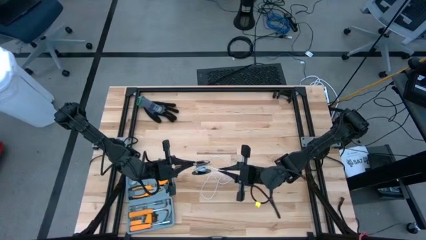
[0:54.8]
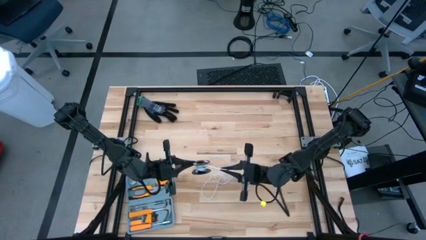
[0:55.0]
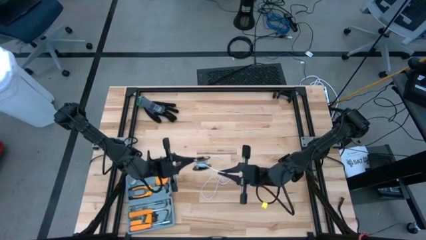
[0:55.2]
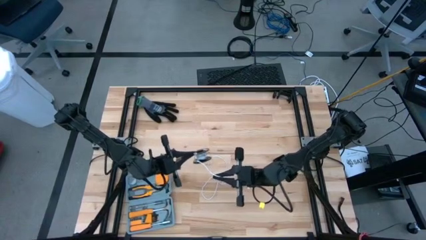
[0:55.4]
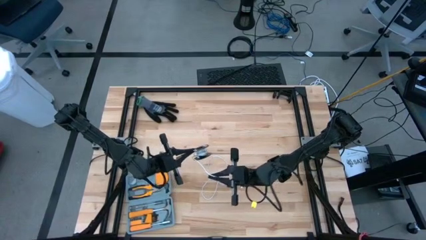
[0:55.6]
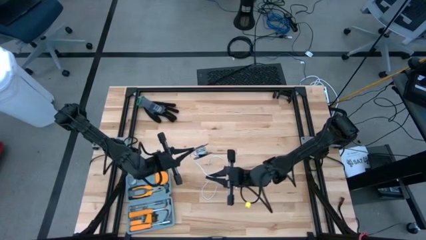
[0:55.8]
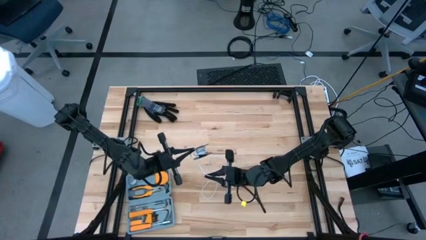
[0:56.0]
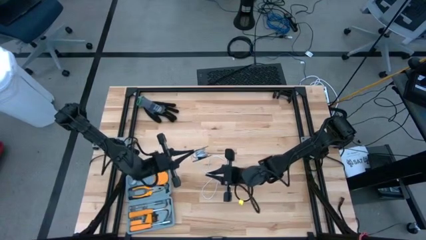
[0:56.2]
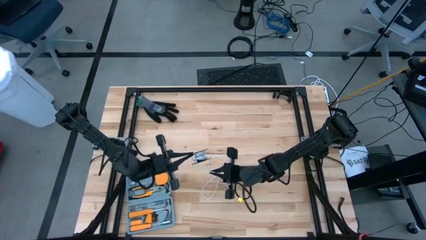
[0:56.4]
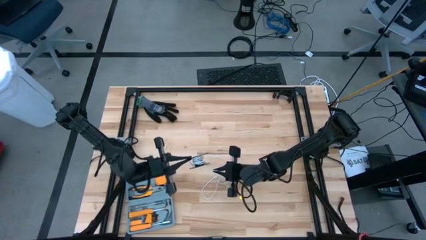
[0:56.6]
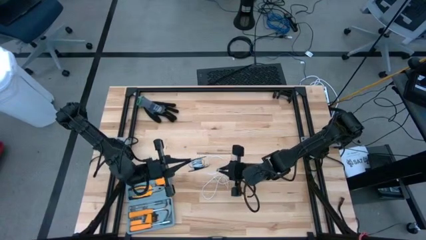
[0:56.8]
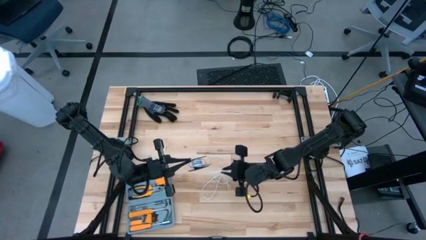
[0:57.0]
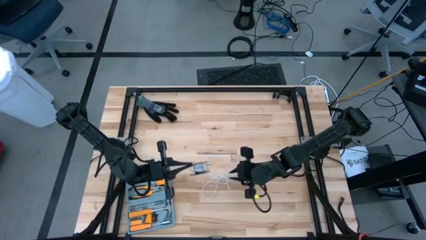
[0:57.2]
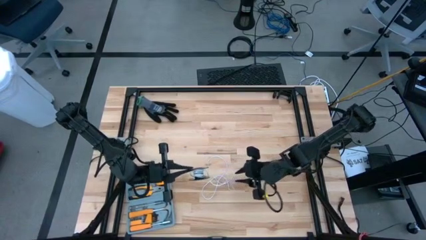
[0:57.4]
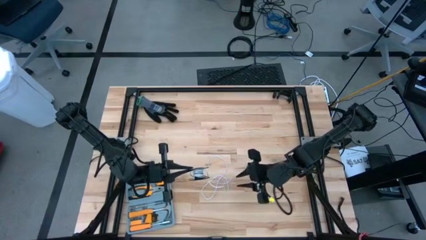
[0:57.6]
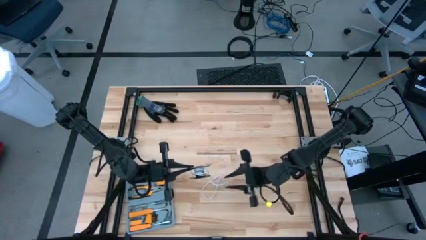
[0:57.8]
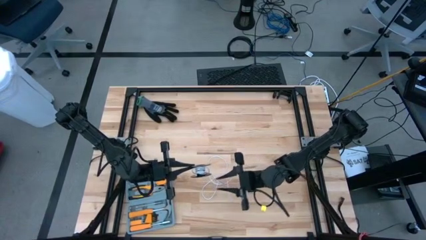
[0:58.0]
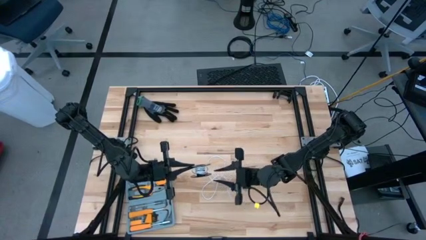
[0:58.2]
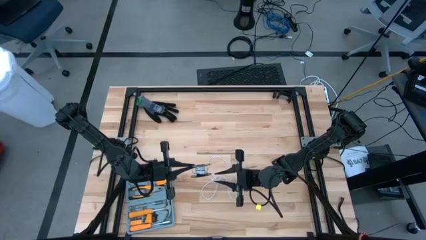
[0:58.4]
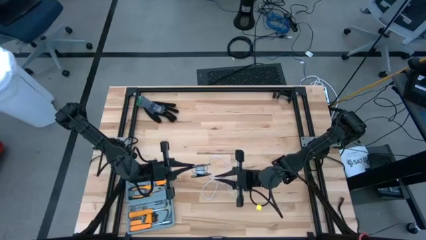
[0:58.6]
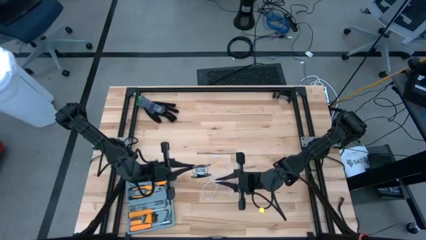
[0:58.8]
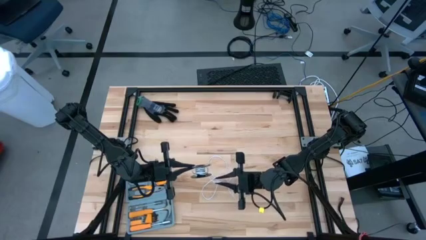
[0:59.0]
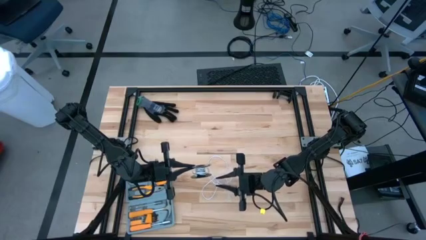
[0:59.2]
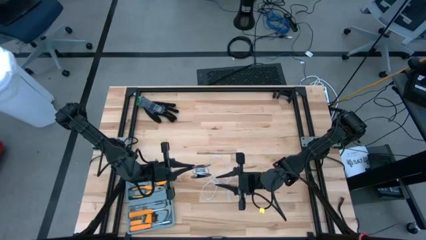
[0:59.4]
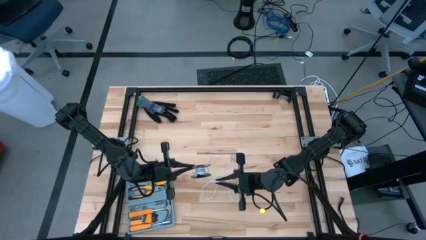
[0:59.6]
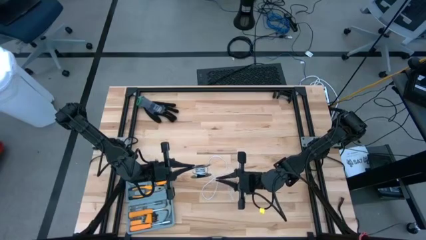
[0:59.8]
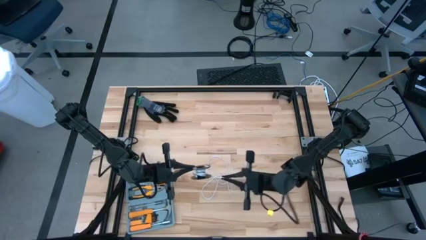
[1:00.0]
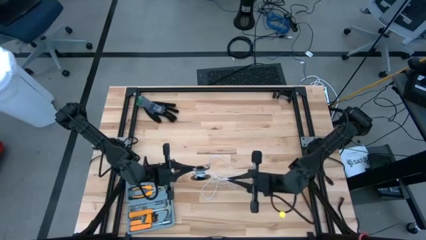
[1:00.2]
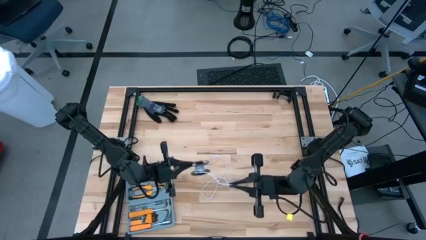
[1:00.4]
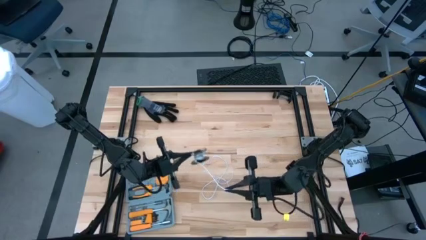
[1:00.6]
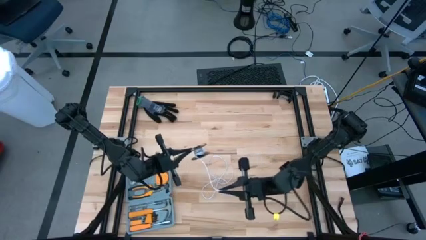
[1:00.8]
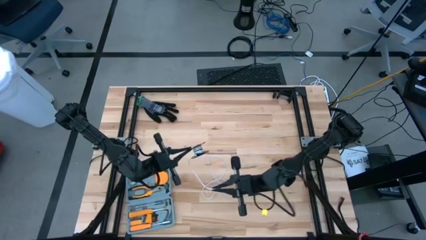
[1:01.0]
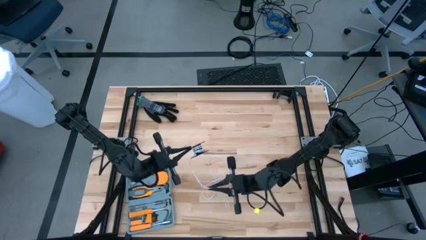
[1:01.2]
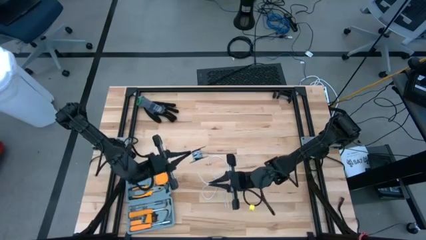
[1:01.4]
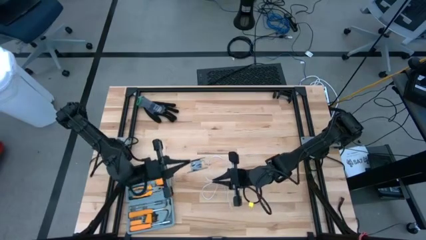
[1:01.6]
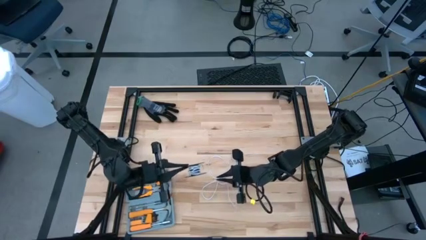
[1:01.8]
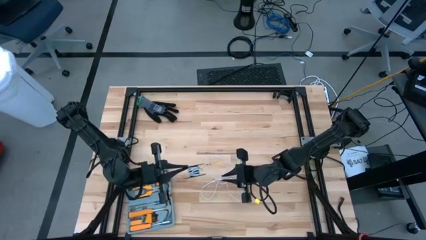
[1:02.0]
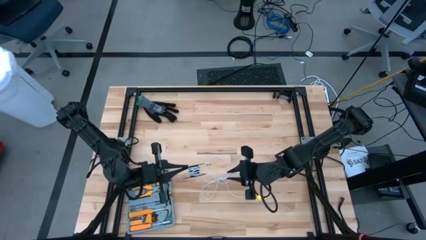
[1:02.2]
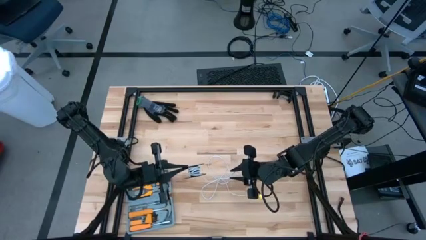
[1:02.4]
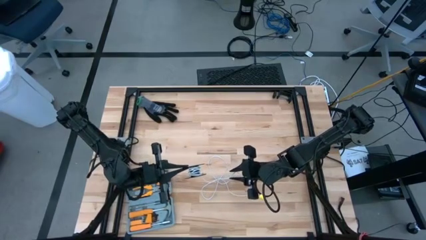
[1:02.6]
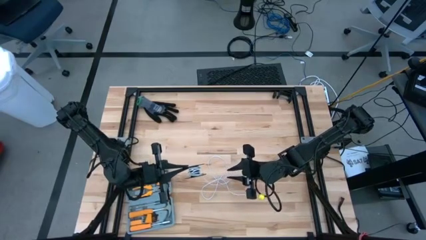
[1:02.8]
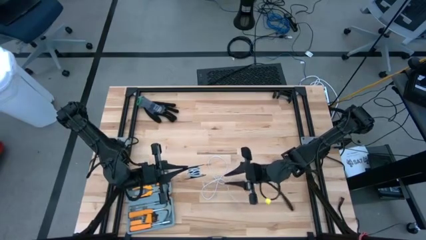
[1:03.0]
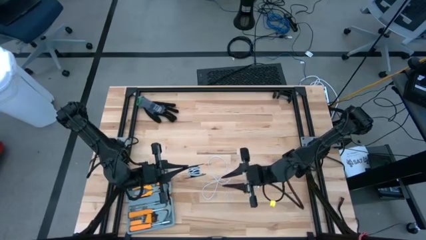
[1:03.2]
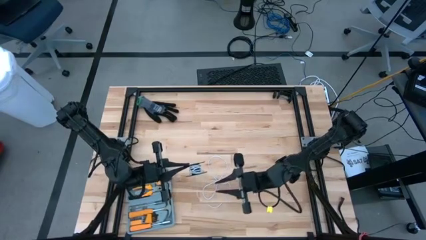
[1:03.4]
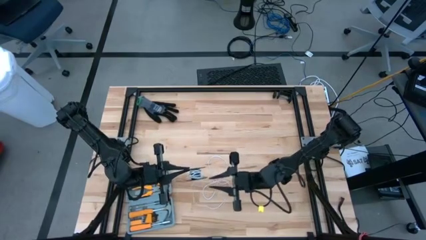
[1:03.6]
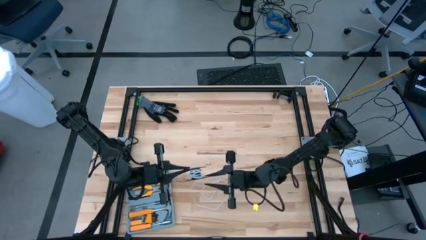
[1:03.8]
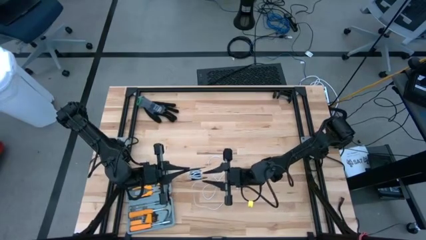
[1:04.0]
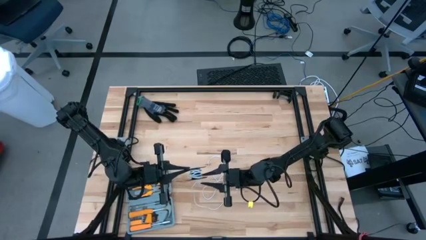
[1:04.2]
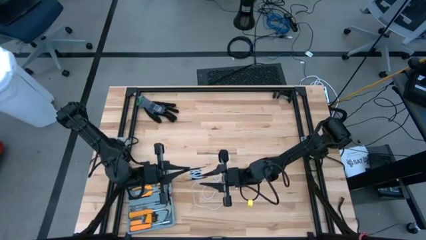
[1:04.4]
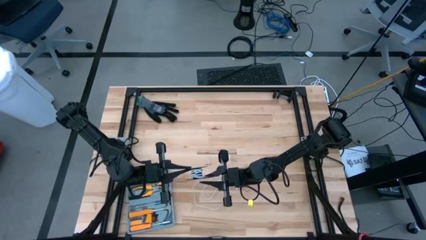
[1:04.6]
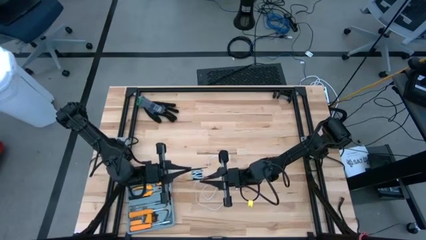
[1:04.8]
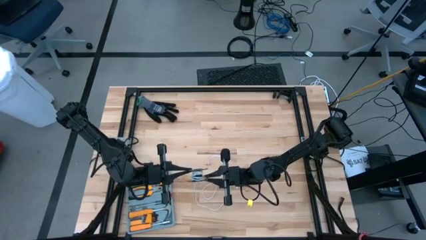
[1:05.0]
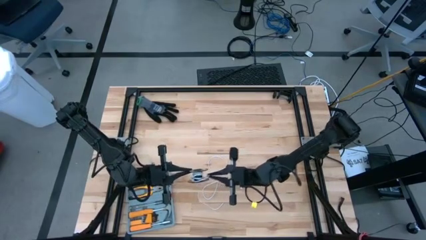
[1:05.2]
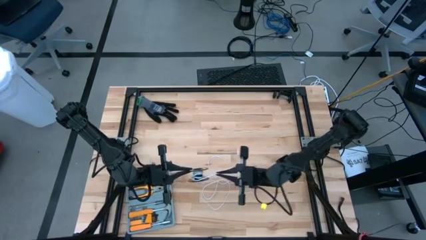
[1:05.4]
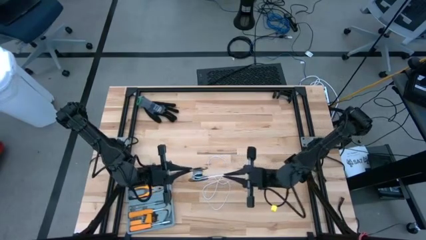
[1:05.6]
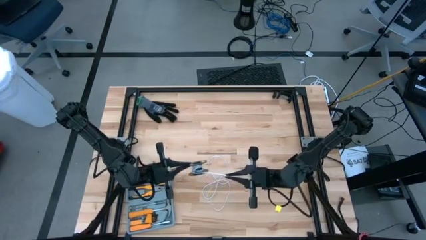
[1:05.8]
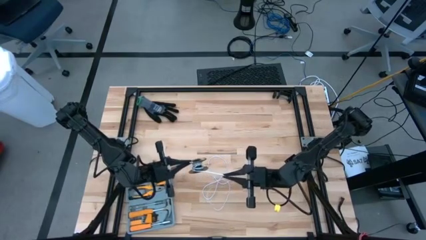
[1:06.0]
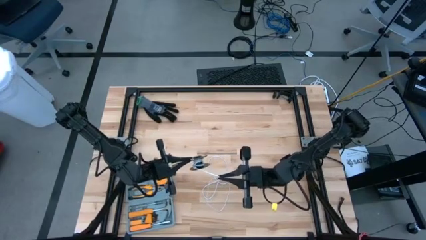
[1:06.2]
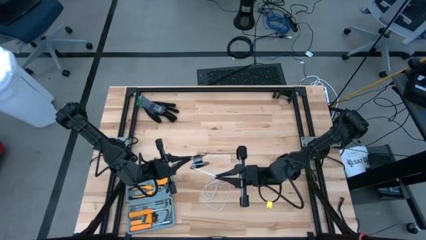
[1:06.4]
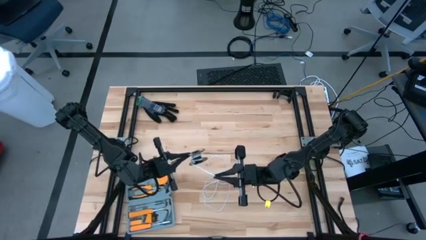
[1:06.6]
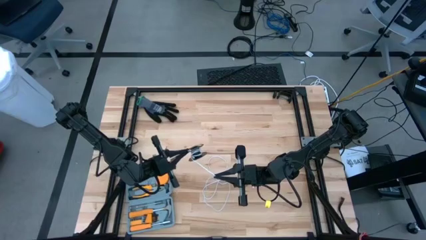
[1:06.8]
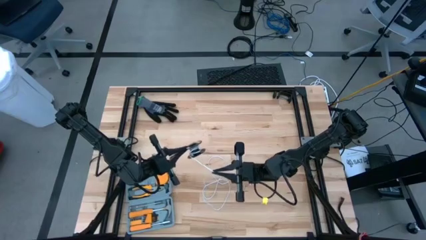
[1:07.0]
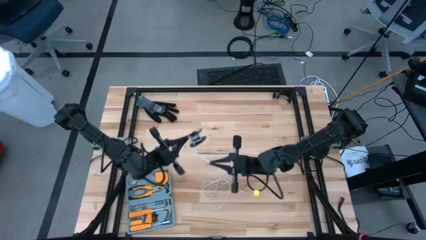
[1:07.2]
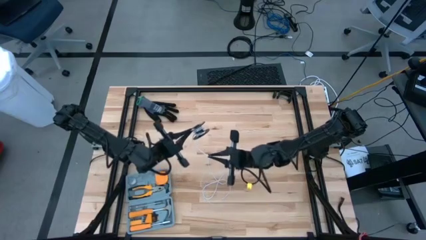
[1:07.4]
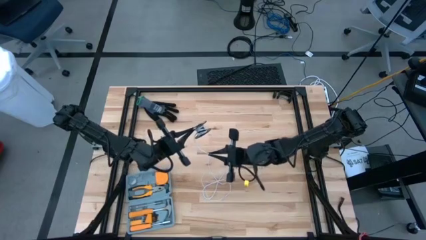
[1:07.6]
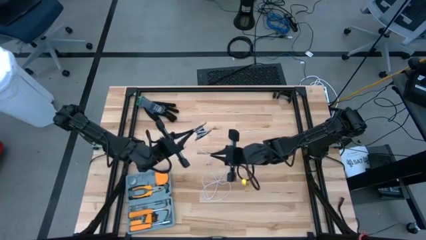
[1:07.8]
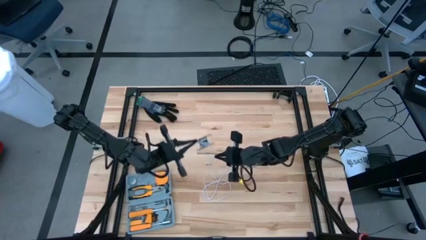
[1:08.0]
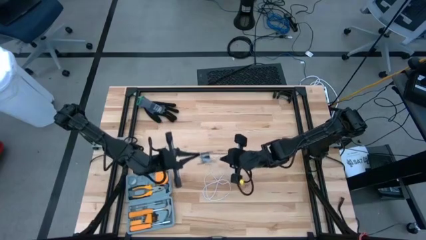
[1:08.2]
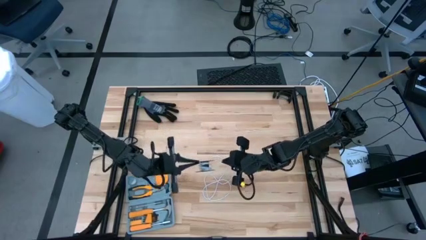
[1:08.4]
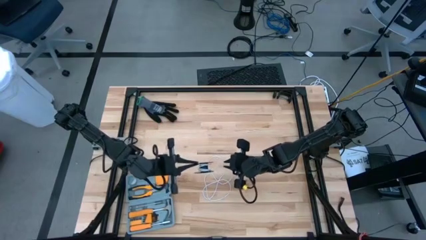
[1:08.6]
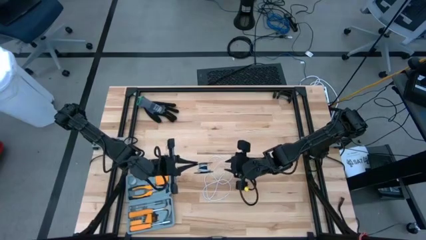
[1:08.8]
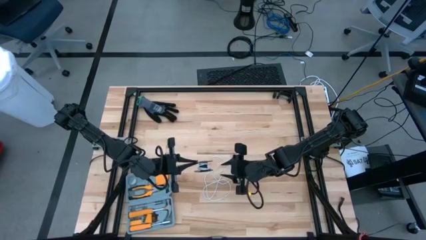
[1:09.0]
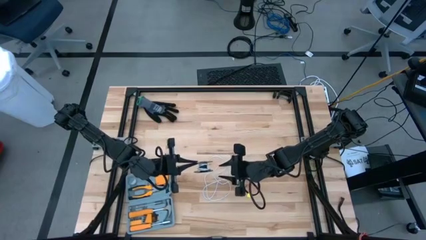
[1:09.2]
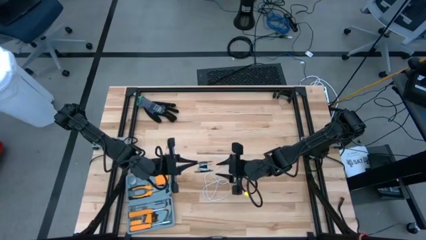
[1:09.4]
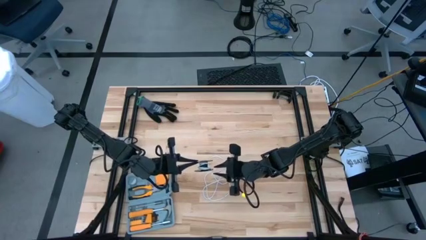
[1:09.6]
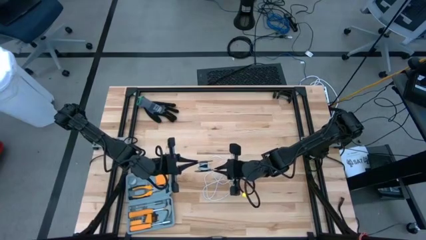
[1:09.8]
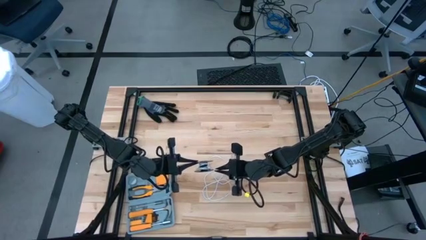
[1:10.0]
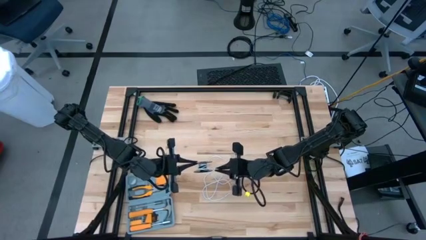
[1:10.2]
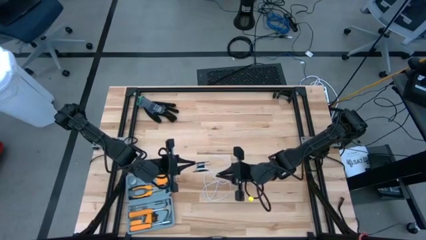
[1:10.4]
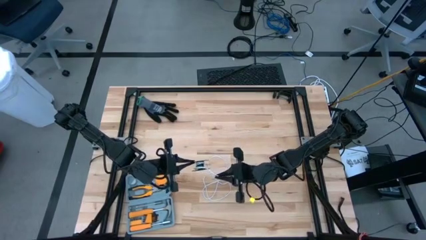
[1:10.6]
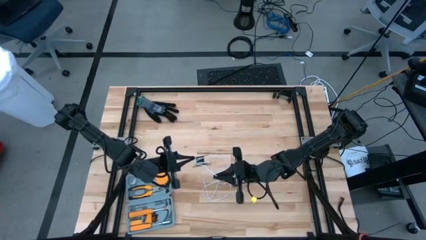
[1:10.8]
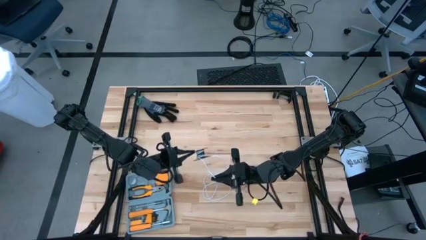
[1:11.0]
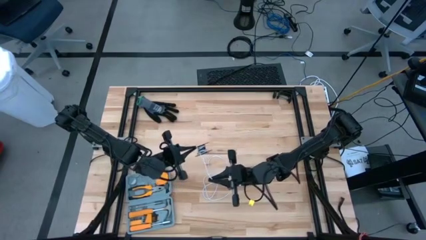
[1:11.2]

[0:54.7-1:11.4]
Task: Coil cords
Uncoil the white cable wire from the spool
